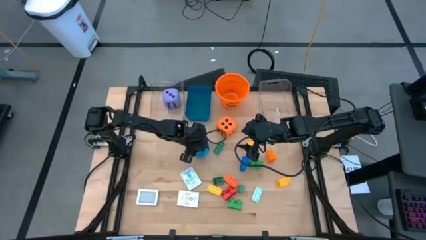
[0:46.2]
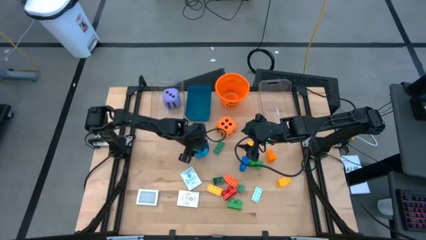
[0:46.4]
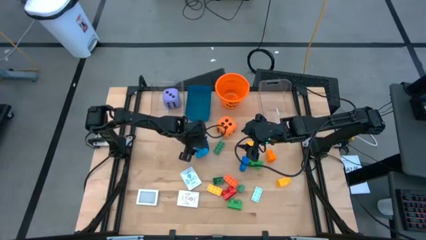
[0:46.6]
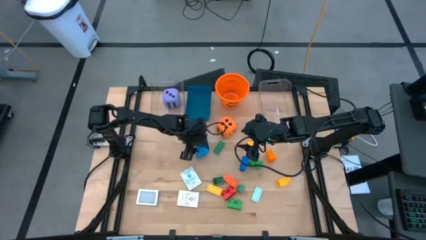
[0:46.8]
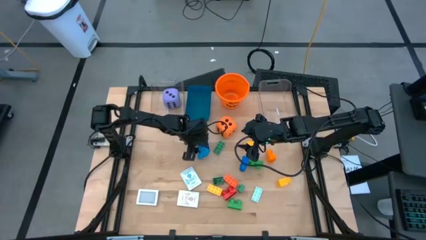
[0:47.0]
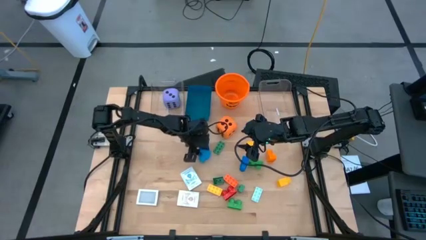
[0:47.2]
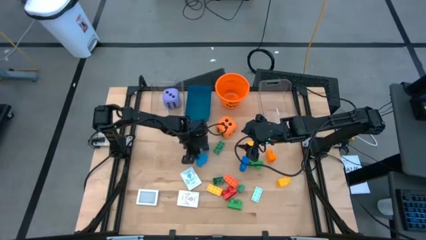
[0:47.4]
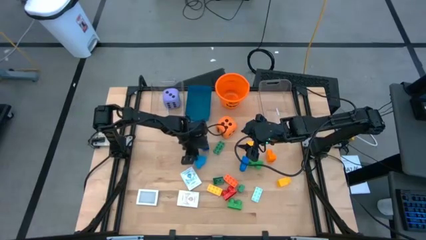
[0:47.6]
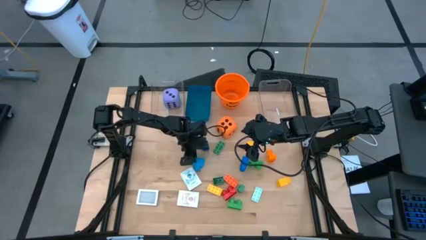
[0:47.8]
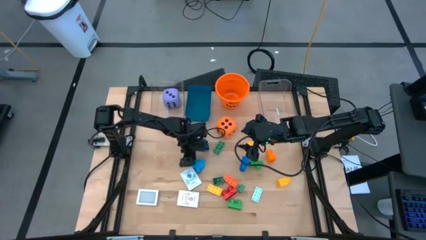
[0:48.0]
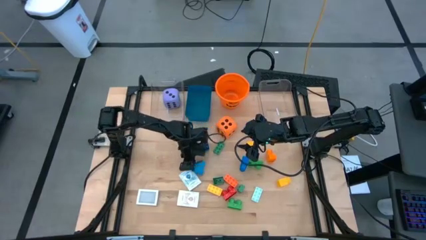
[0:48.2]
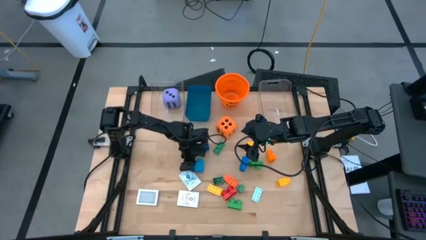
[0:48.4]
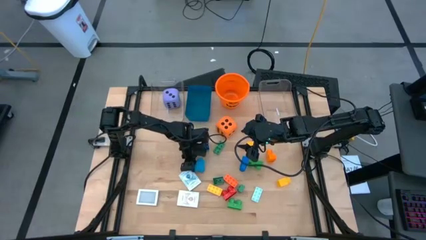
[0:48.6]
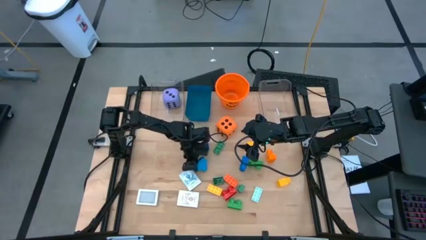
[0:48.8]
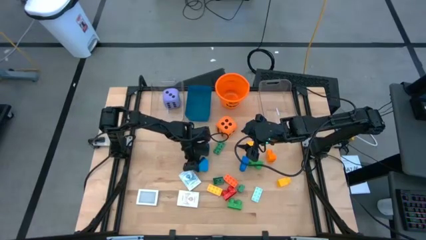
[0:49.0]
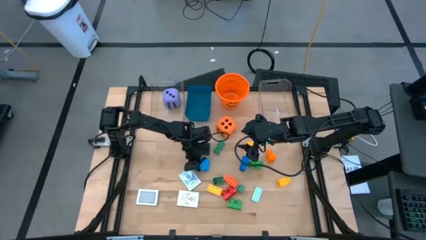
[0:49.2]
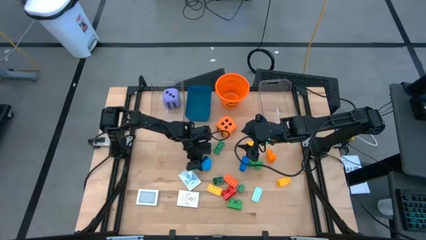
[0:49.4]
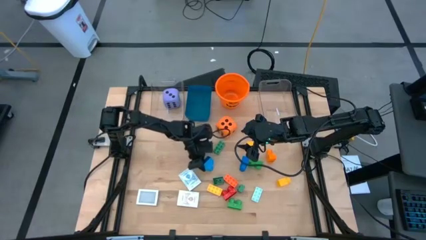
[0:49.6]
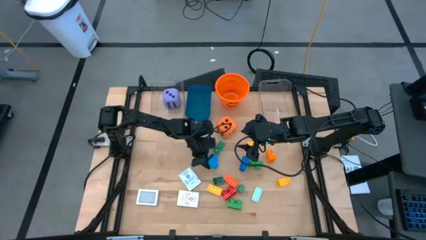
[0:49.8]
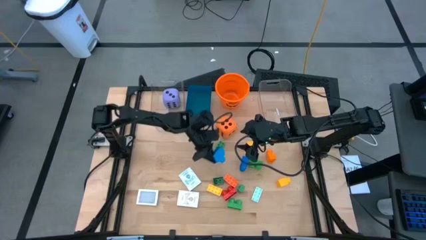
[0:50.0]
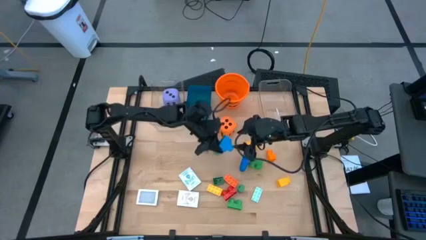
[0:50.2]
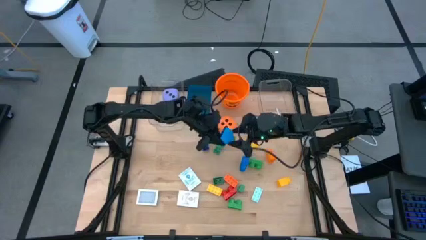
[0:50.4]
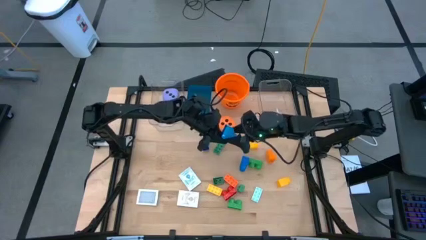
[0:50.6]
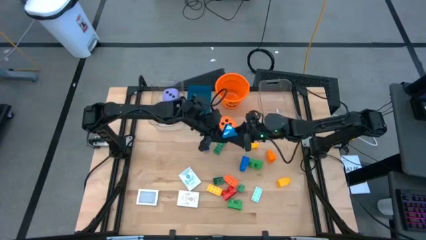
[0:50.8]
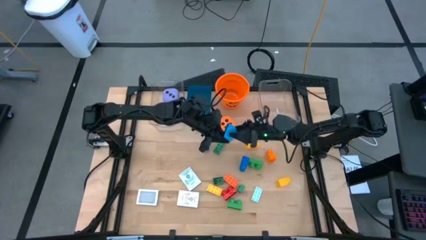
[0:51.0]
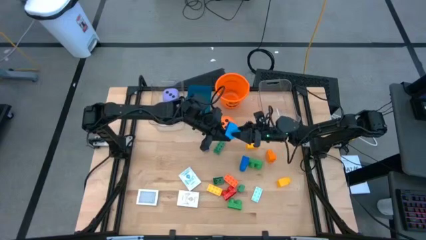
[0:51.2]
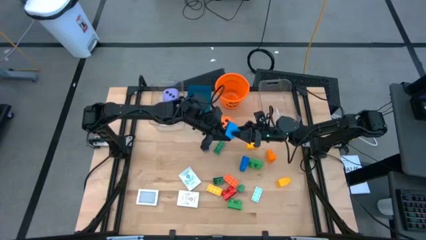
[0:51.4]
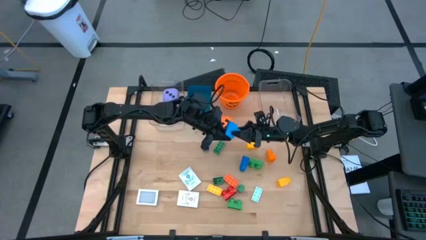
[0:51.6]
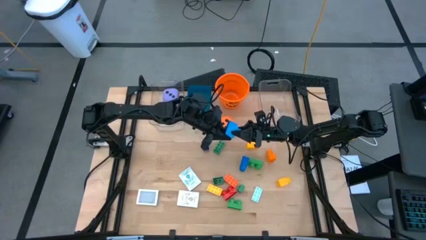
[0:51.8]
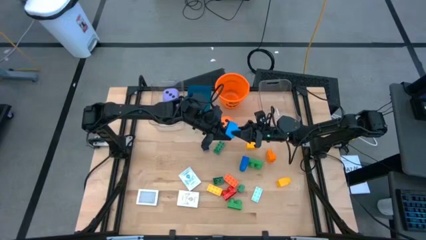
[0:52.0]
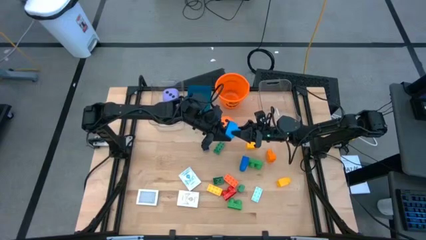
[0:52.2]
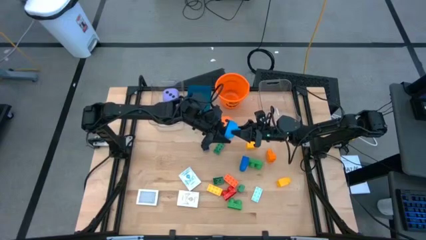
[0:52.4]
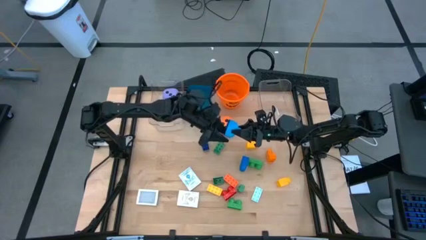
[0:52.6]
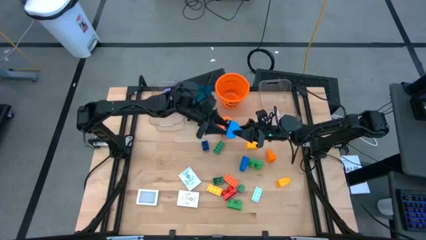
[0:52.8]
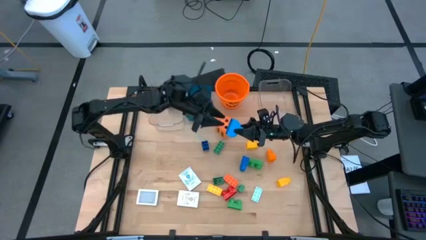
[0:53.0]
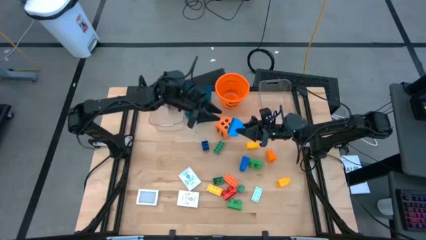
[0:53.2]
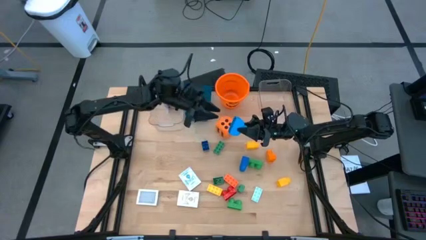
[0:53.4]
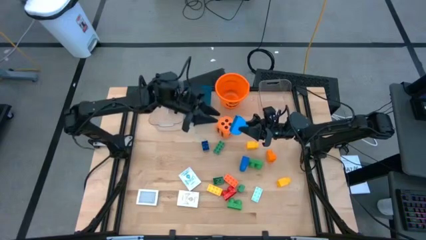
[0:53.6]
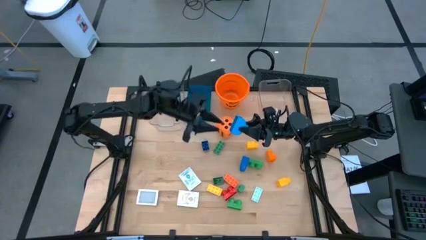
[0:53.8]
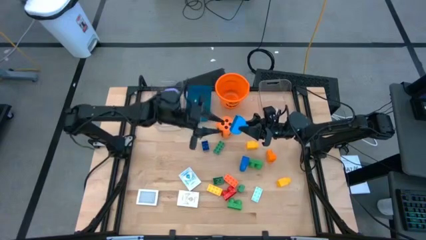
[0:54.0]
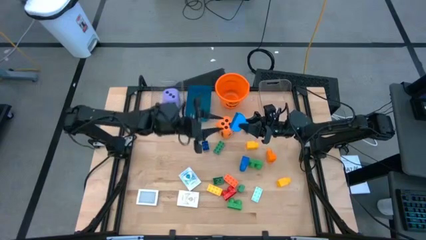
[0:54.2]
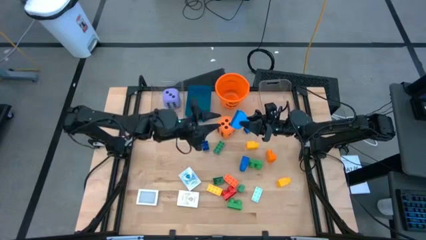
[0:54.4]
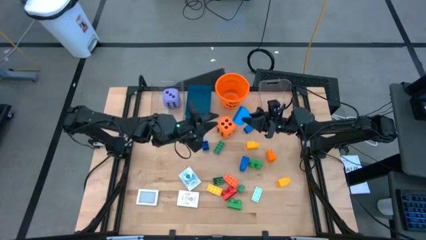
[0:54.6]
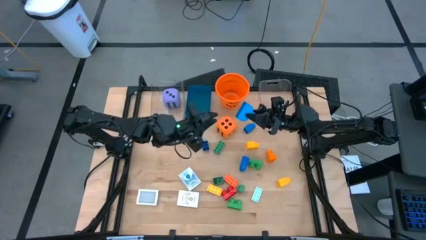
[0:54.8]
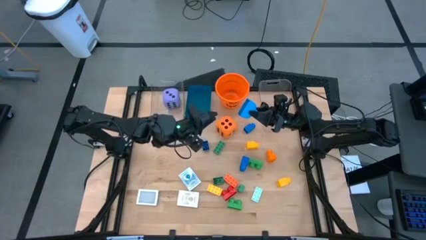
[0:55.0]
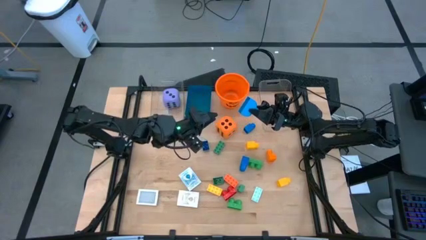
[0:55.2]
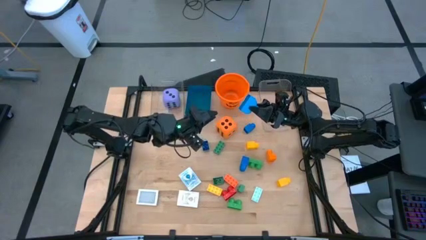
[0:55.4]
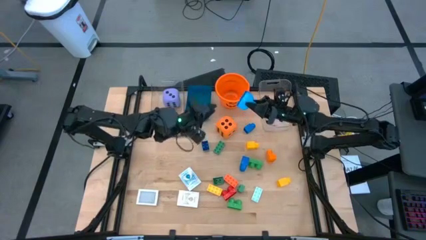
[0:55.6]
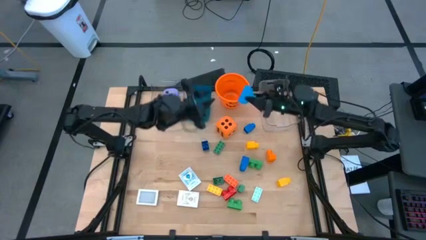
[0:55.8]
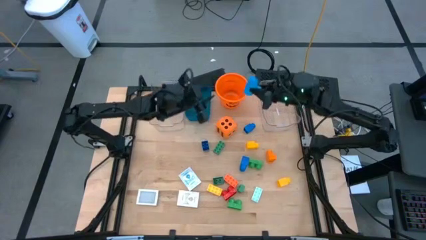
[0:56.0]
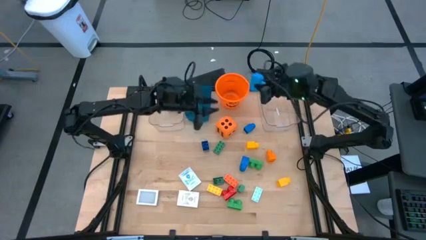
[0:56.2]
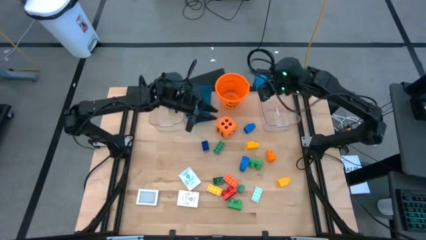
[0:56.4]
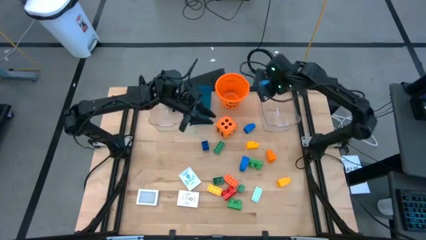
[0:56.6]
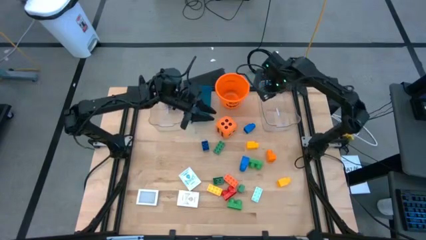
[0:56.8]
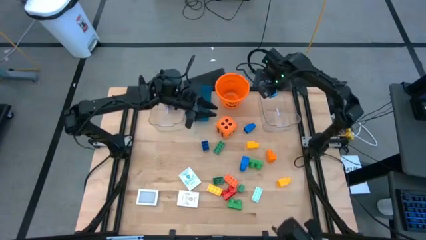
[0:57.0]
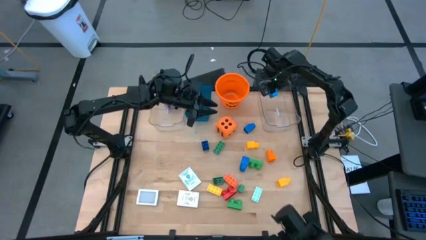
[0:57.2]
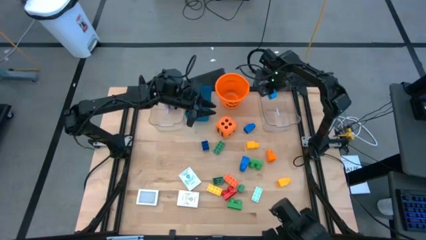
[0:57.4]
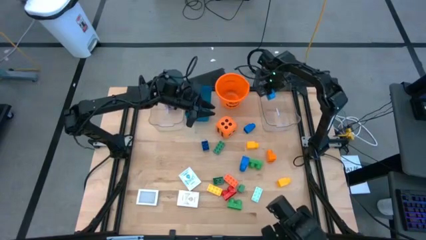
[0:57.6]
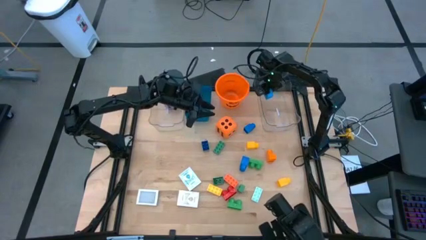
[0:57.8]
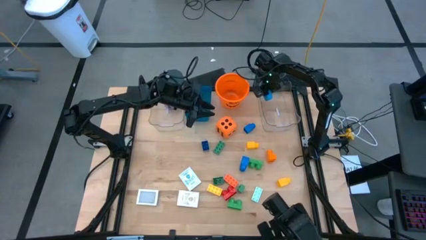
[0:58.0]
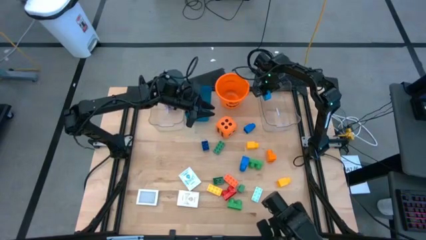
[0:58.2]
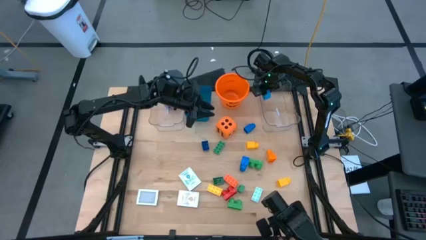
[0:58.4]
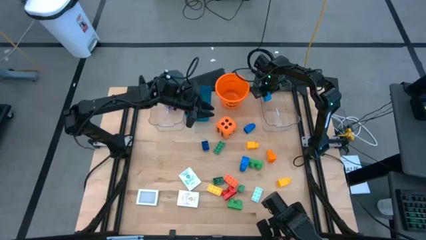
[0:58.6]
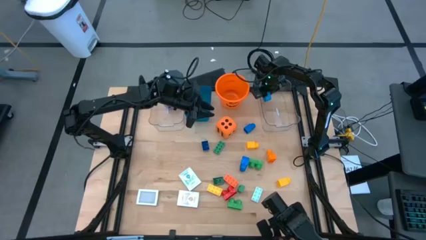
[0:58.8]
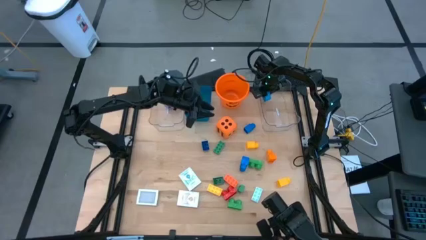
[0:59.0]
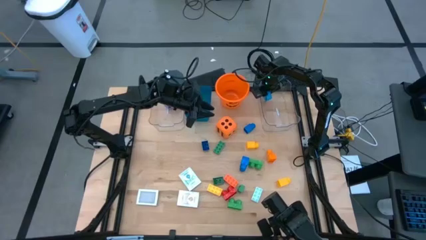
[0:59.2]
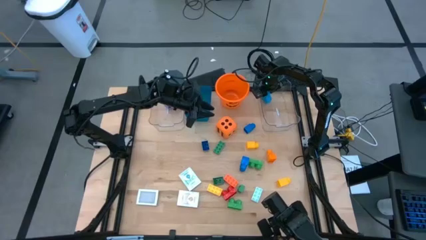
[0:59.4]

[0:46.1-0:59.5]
Task: Pick & Place Toys
Put the blue game piece into the right transparent bin
